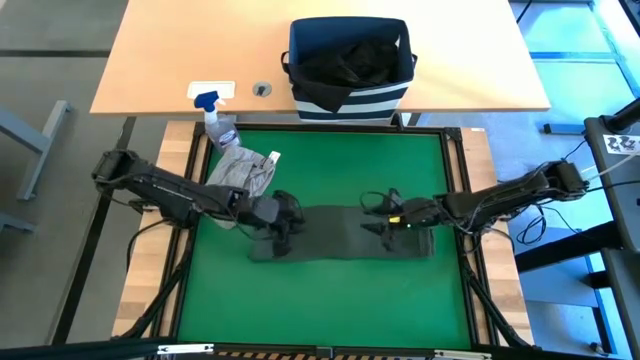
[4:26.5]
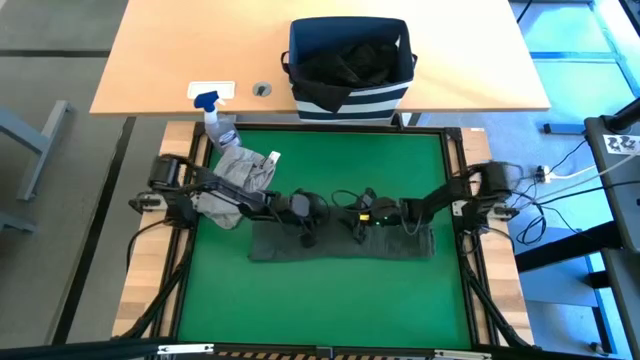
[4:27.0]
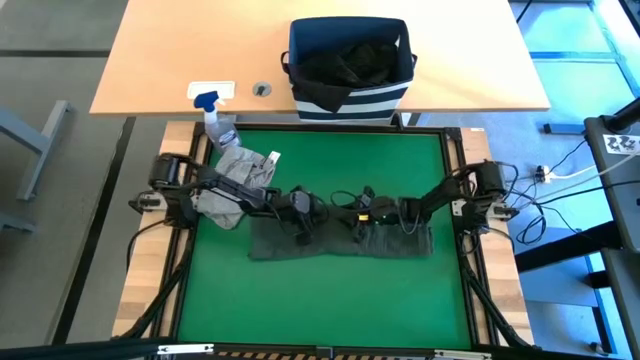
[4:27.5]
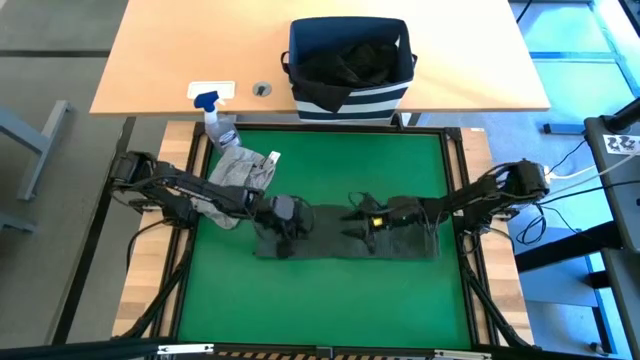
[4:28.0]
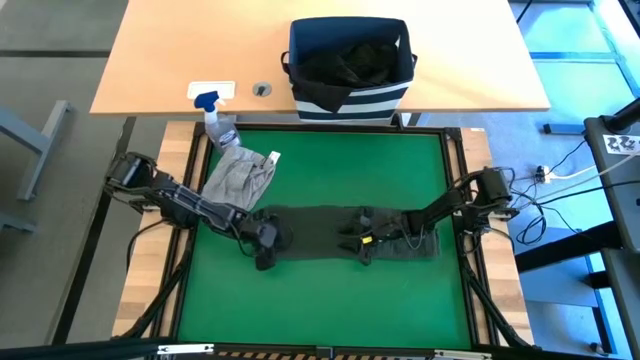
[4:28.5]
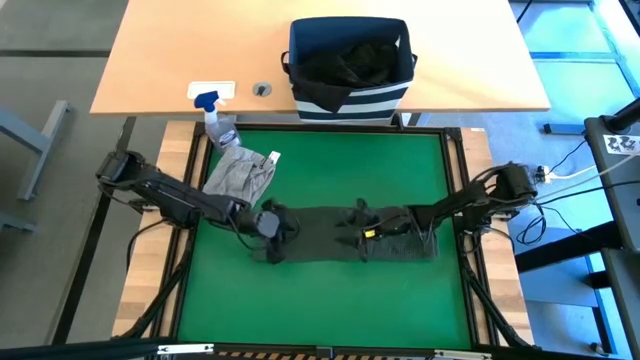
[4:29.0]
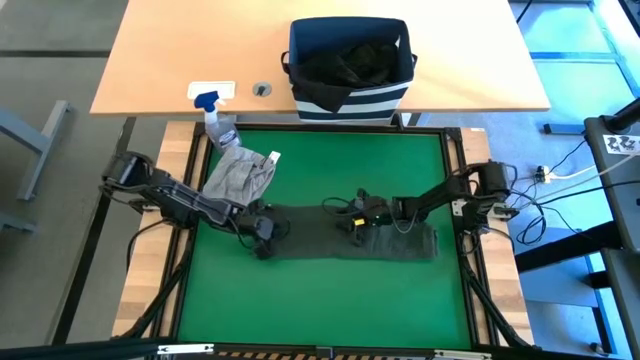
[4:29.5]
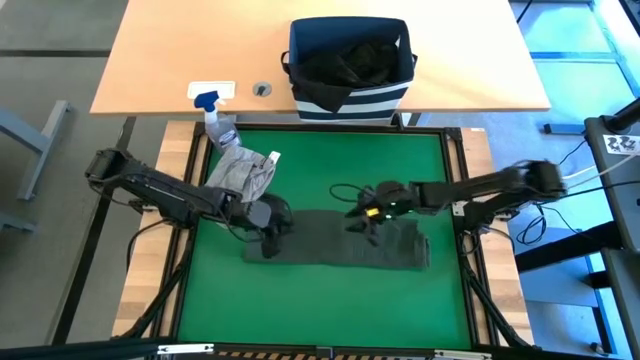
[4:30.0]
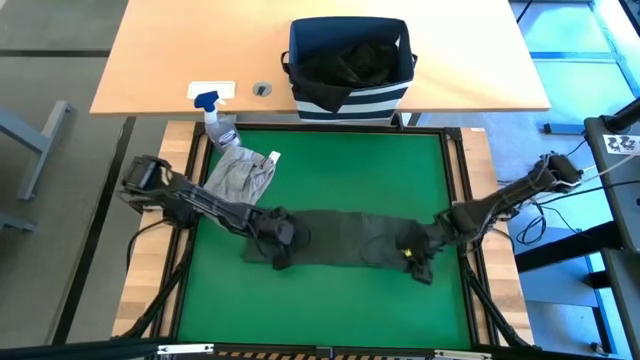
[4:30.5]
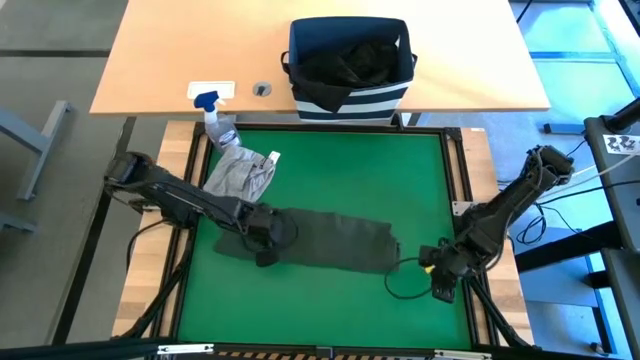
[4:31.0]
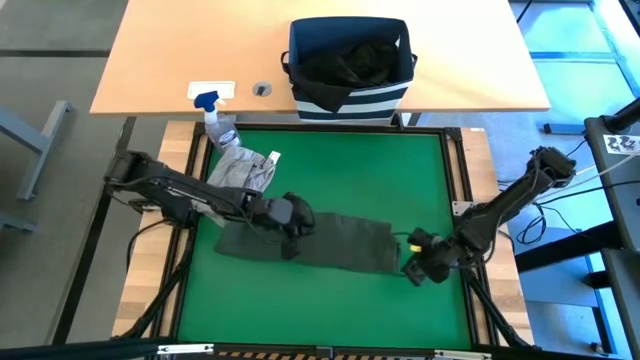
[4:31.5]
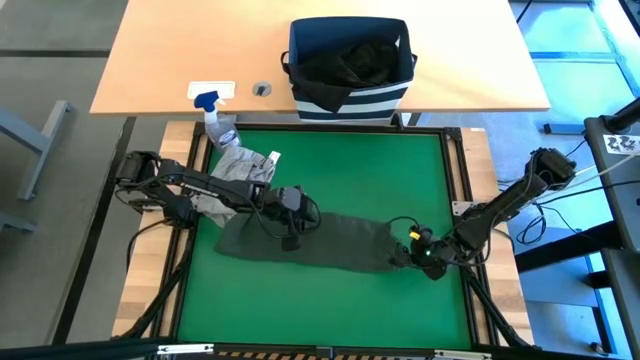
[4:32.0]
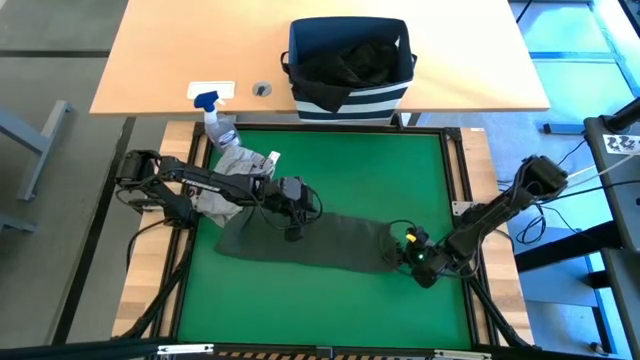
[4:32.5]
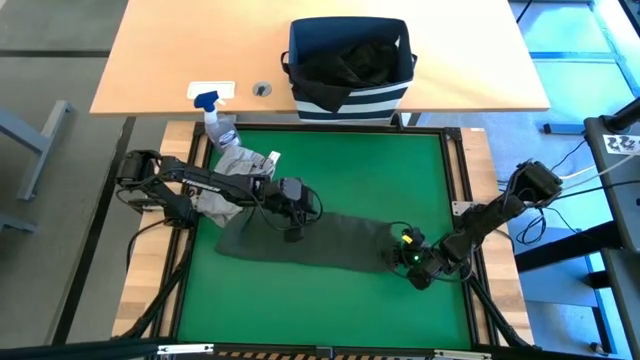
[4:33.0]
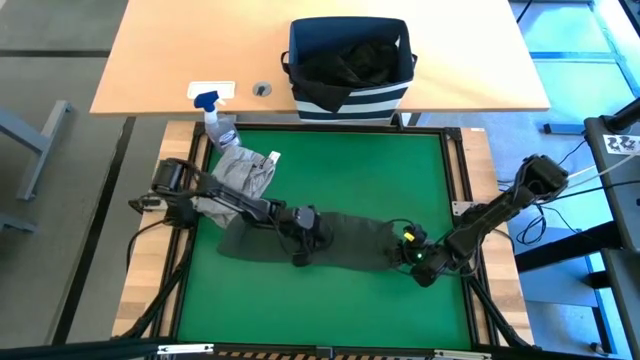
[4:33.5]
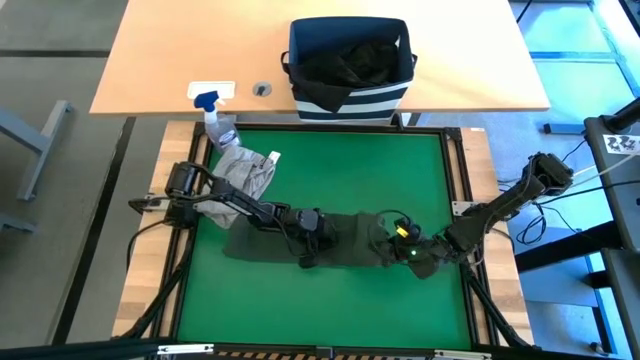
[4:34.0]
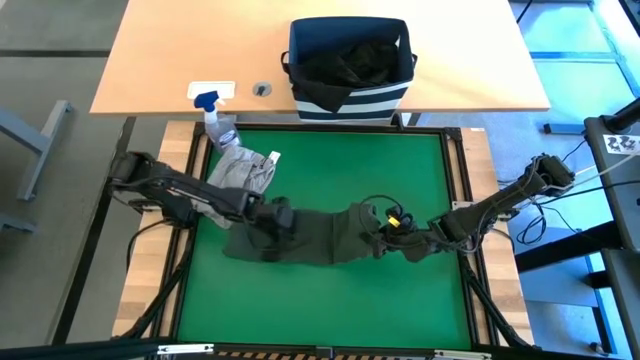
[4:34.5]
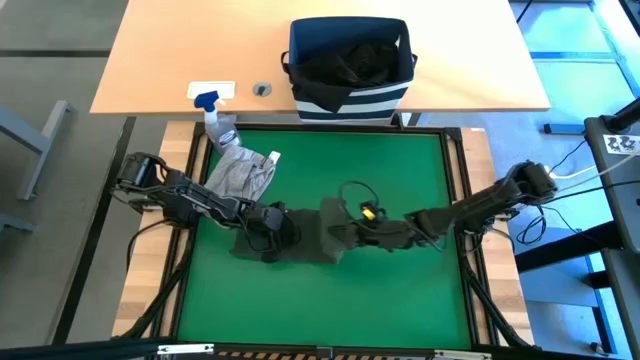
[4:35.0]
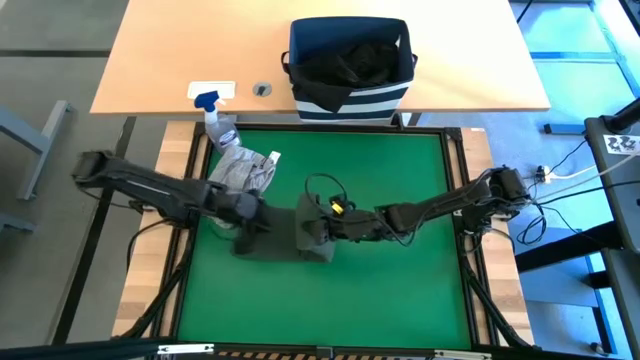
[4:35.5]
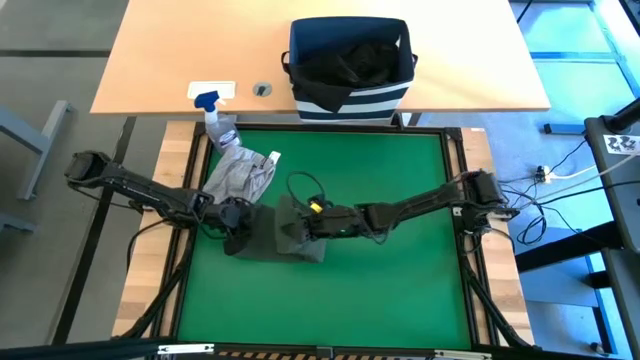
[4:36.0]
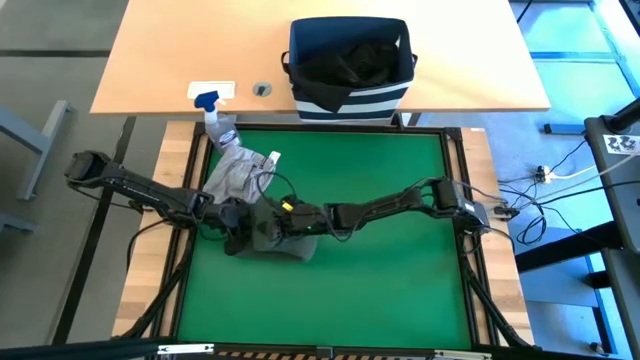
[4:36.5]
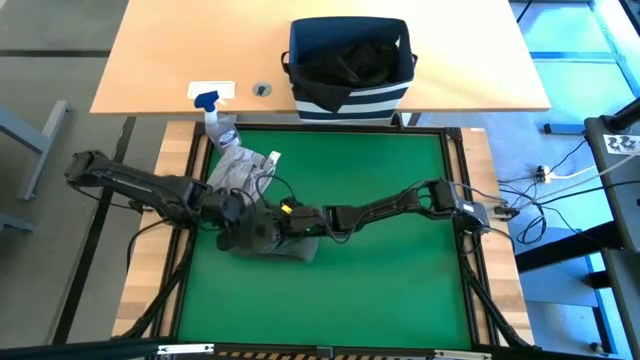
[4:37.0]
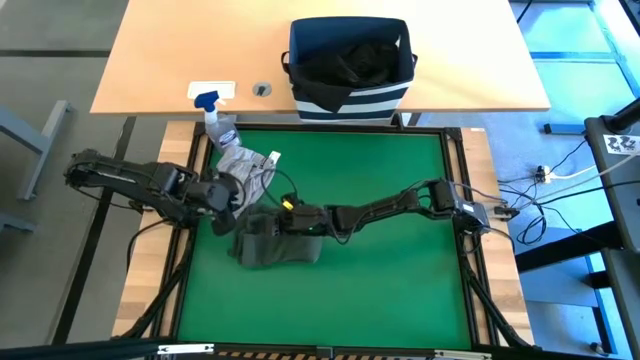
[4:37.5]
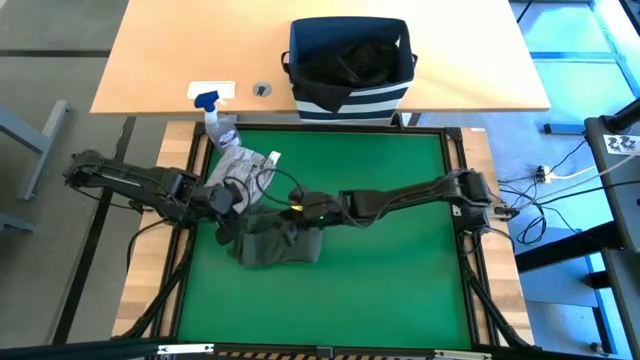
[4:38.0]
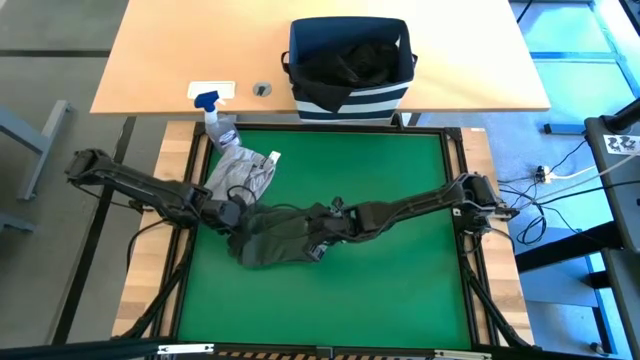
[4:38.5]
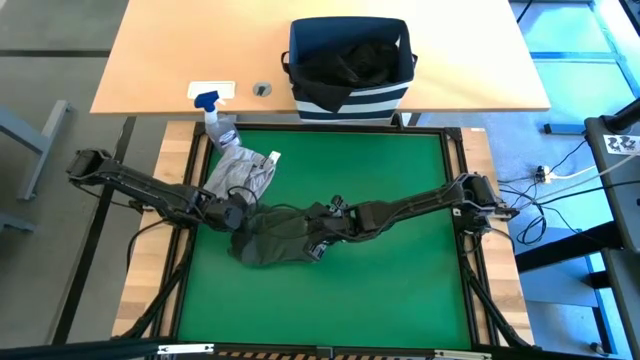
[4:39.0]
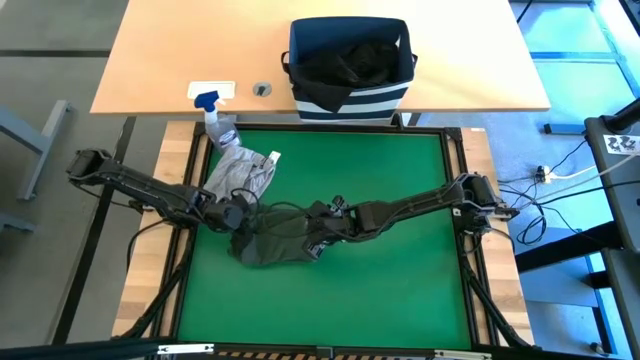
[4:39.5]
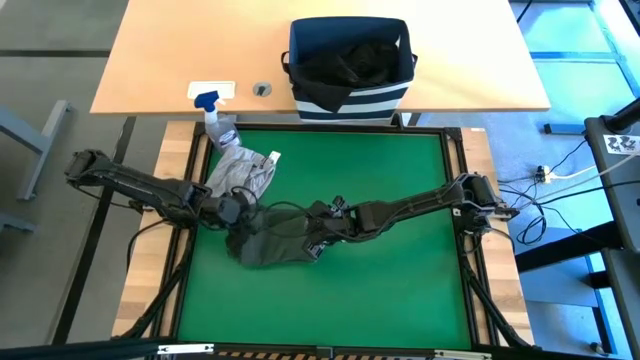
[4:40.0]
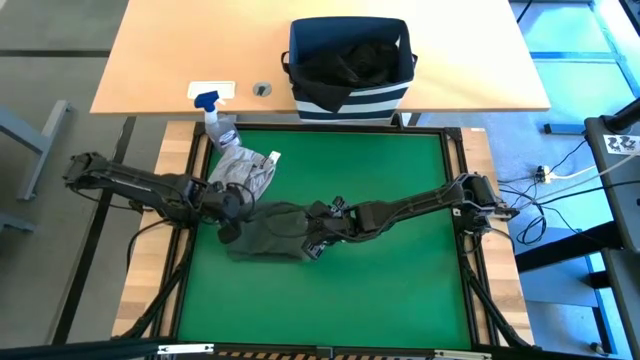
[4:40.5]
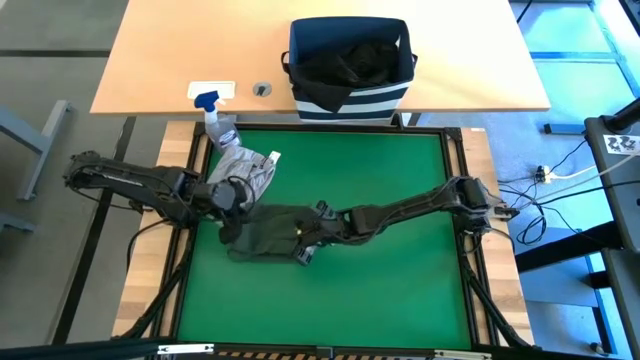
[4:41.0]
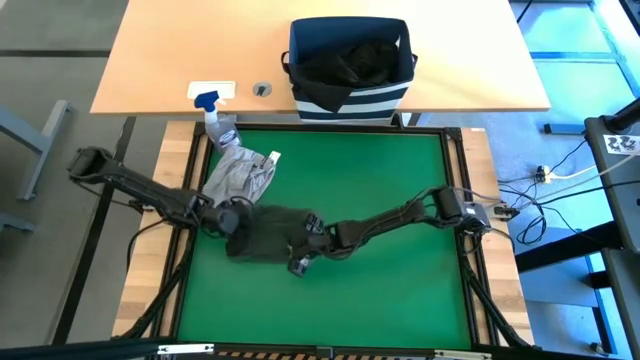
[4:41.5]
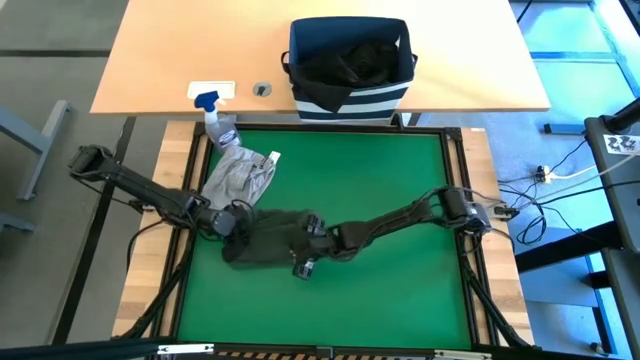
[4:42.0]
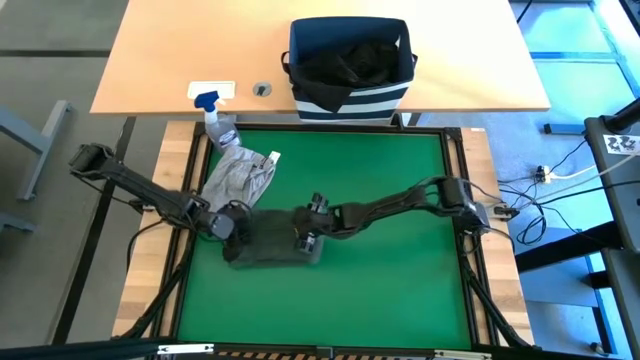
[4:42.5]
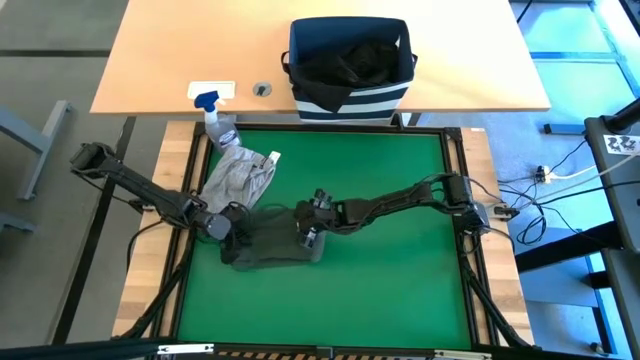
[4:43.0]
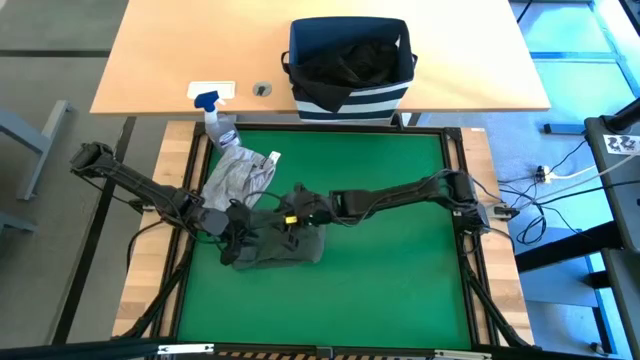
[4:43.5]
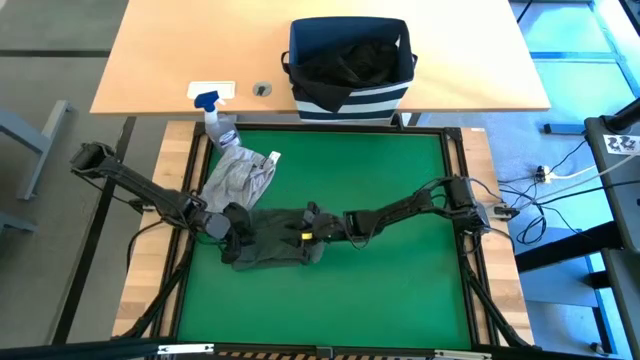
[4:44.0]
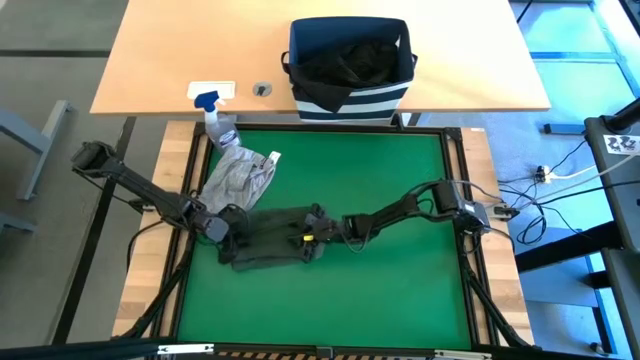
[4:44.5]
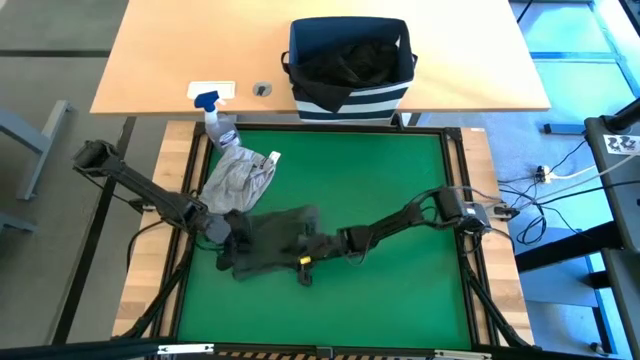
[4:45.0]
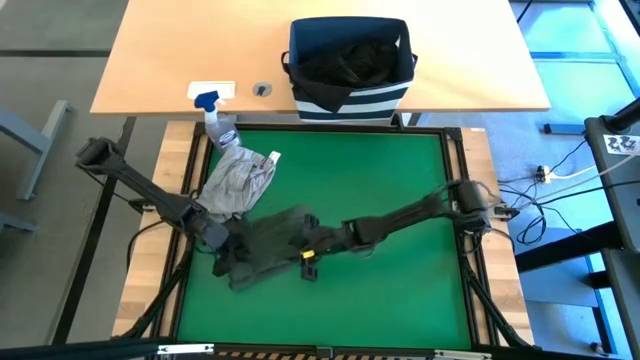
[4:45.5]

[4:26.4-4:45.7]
Task: Fold Laundry from Bin
Fold the green shirt

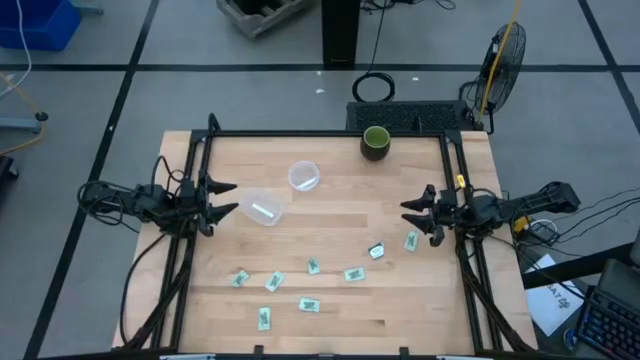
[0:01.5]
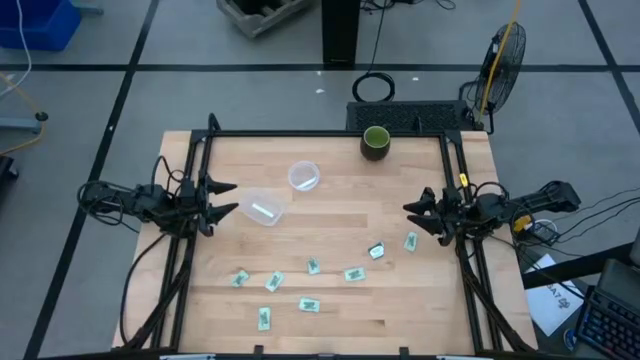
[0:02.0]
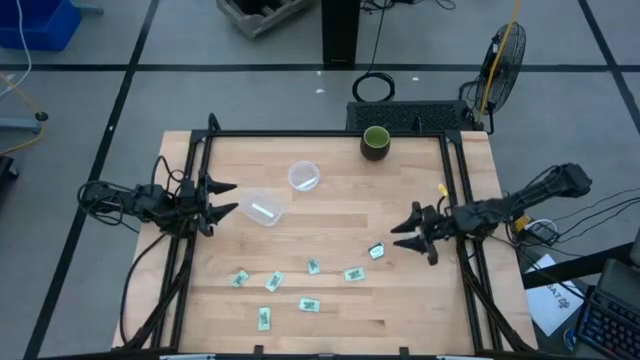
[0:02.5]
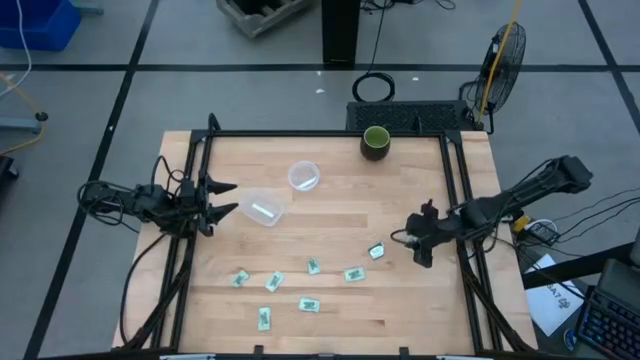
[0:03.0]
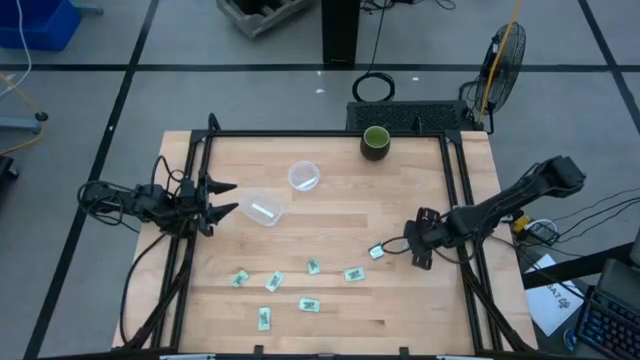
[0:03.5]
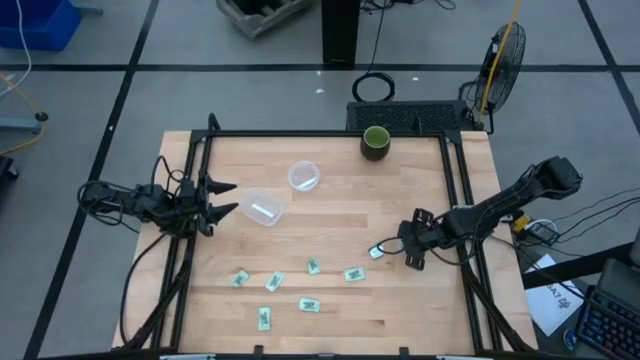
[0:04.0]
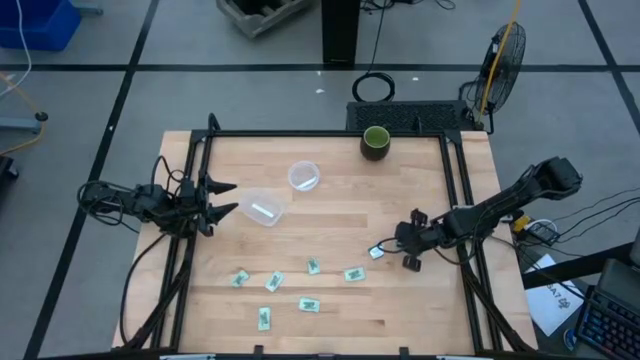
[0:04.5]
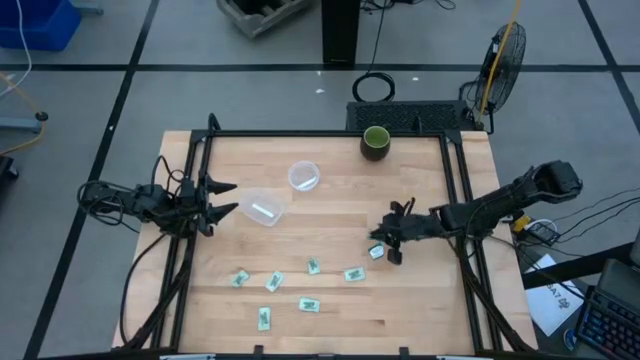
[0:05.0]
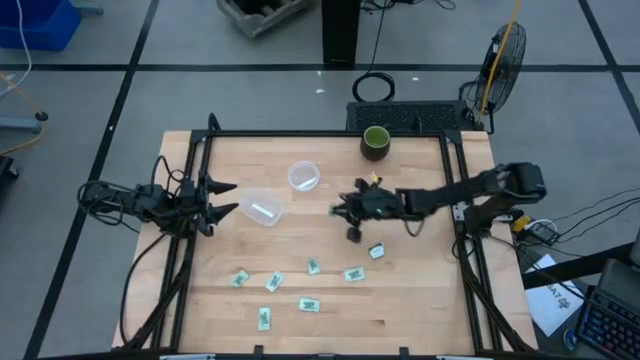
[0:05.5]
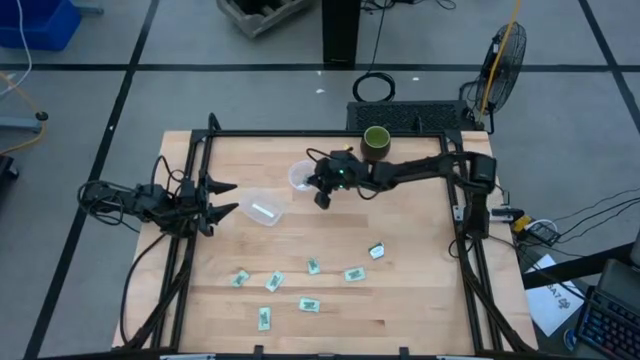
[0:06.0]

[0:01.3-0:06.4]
Task: Pick and place Stevia / Truvia into bins
Put the stevia packet into the top container
